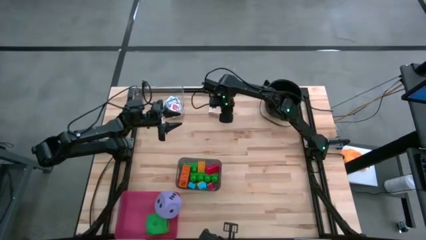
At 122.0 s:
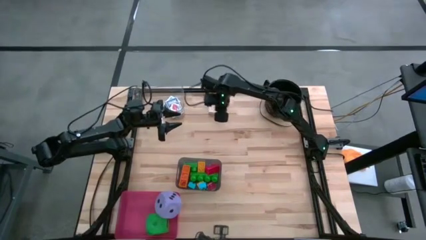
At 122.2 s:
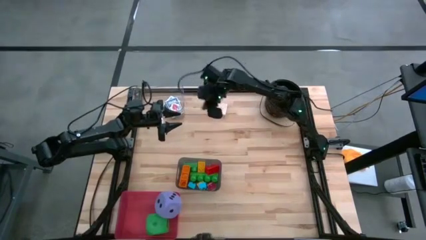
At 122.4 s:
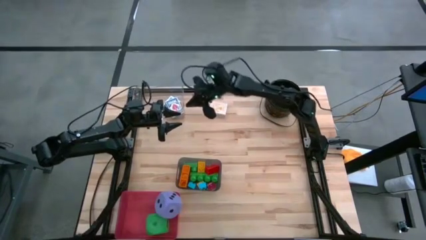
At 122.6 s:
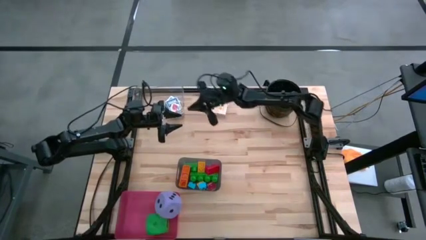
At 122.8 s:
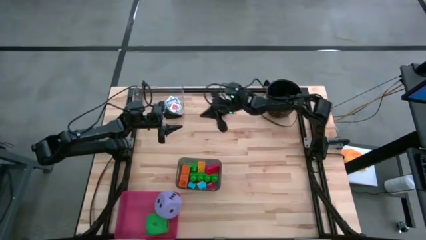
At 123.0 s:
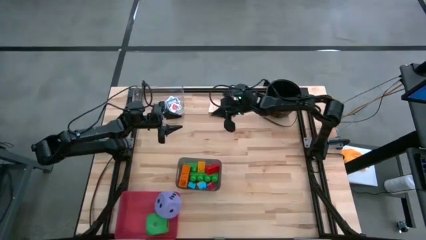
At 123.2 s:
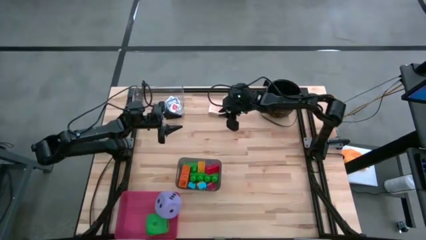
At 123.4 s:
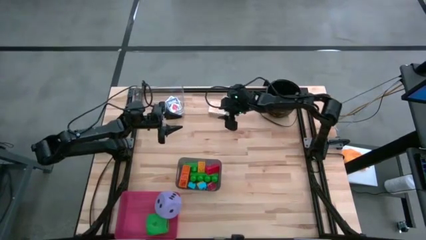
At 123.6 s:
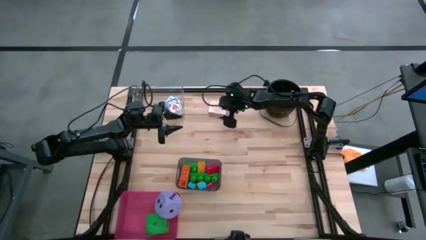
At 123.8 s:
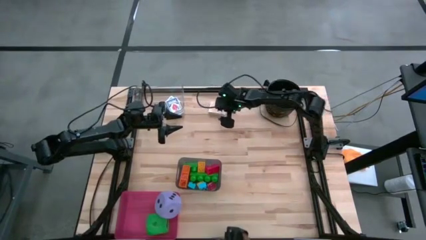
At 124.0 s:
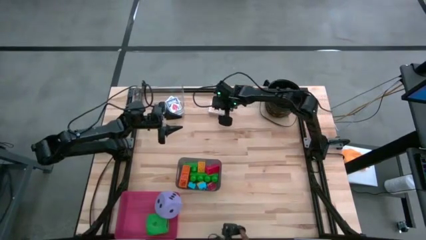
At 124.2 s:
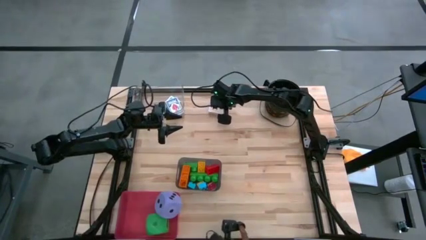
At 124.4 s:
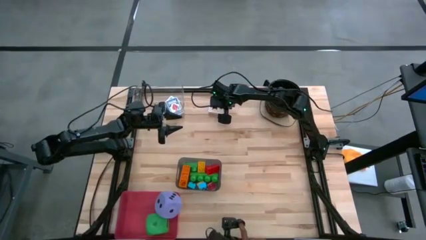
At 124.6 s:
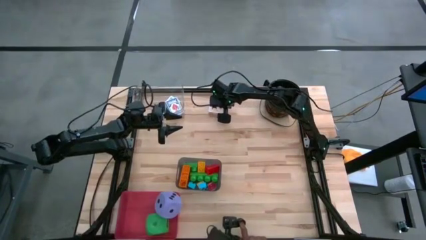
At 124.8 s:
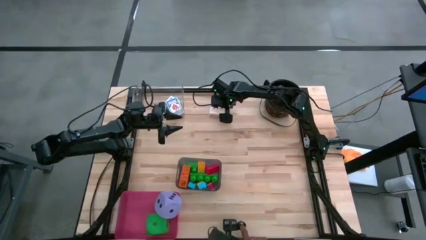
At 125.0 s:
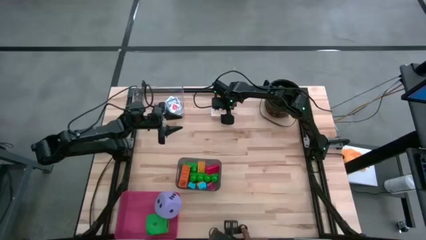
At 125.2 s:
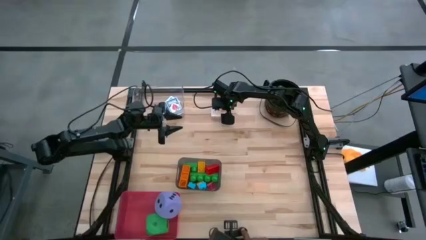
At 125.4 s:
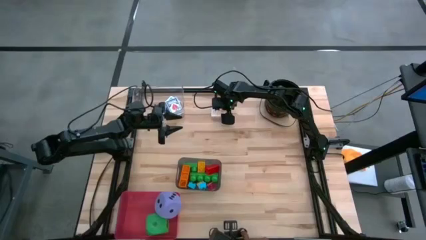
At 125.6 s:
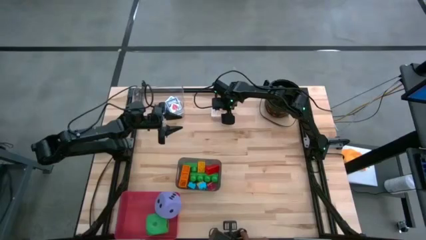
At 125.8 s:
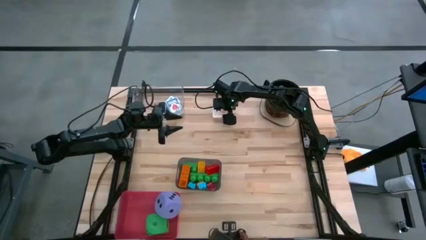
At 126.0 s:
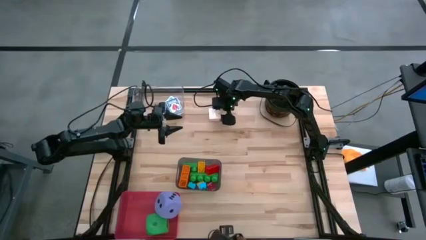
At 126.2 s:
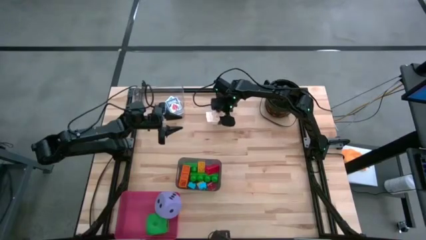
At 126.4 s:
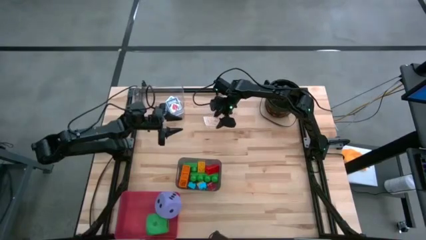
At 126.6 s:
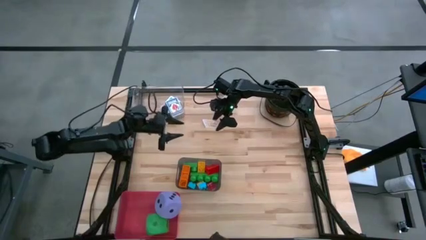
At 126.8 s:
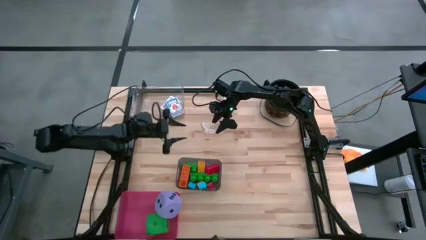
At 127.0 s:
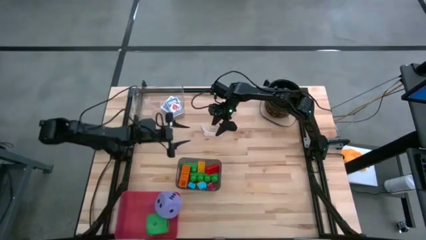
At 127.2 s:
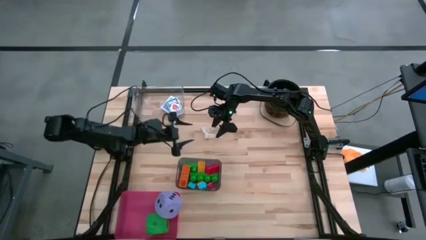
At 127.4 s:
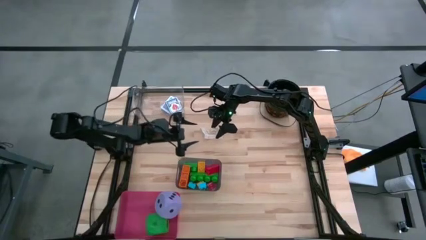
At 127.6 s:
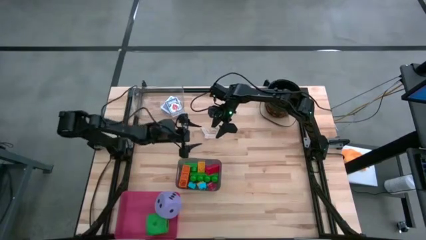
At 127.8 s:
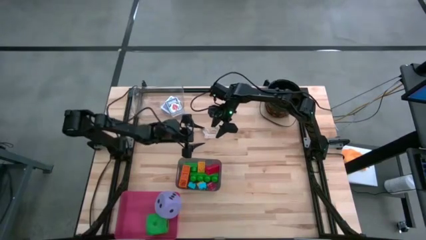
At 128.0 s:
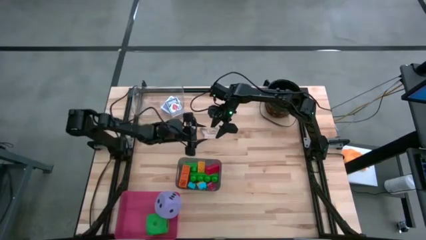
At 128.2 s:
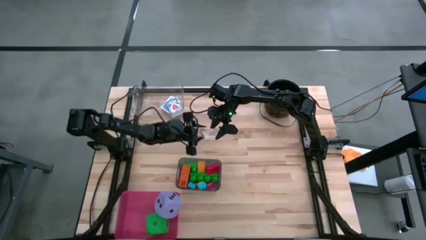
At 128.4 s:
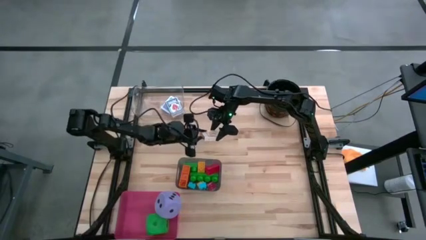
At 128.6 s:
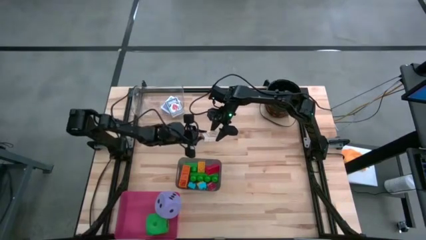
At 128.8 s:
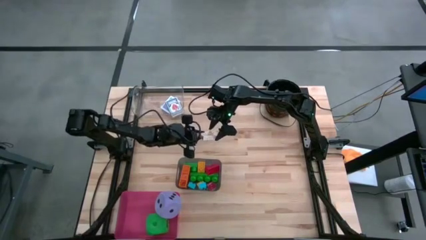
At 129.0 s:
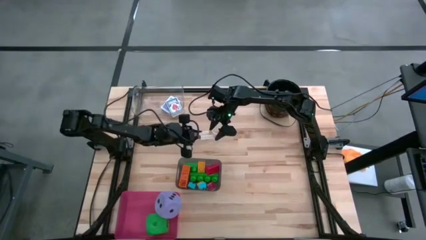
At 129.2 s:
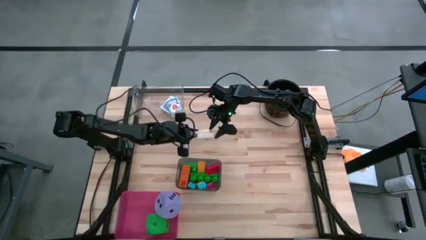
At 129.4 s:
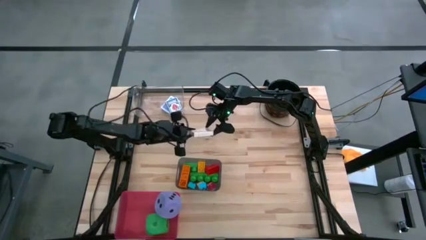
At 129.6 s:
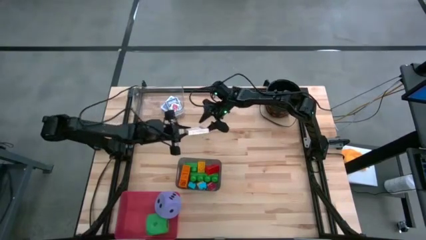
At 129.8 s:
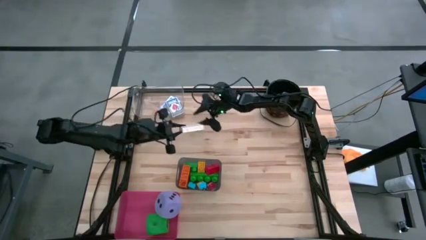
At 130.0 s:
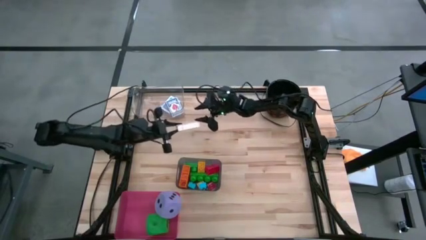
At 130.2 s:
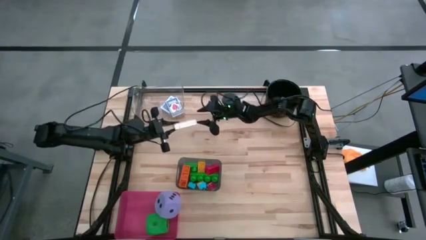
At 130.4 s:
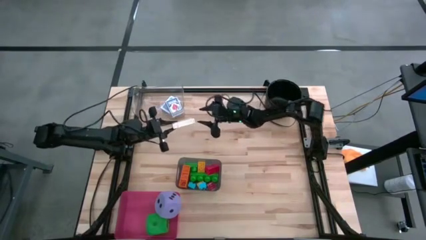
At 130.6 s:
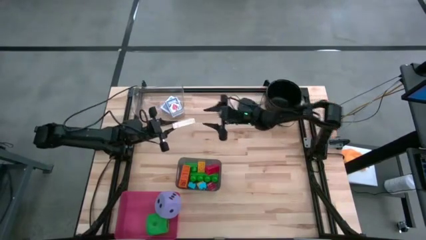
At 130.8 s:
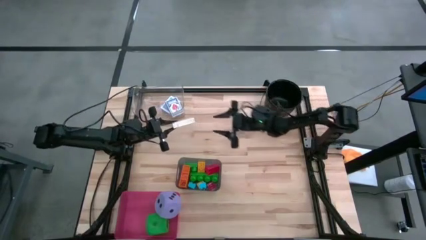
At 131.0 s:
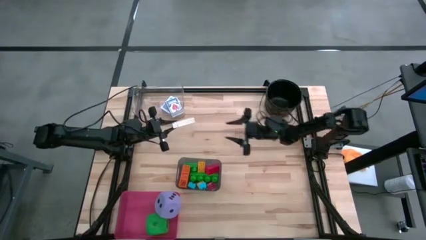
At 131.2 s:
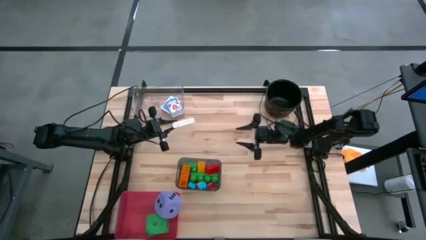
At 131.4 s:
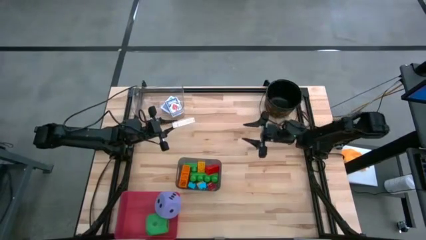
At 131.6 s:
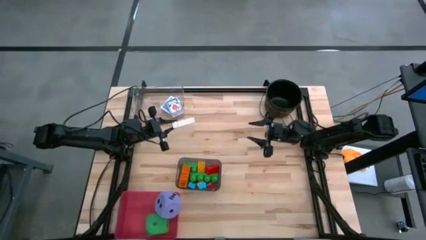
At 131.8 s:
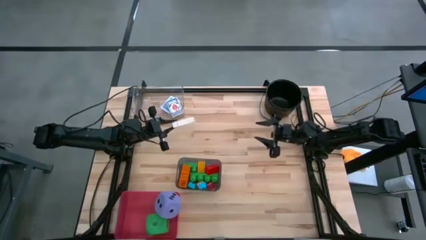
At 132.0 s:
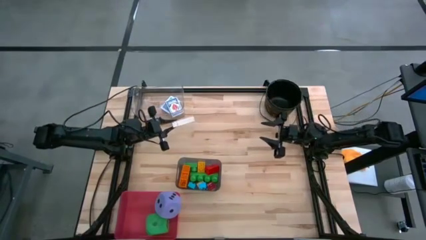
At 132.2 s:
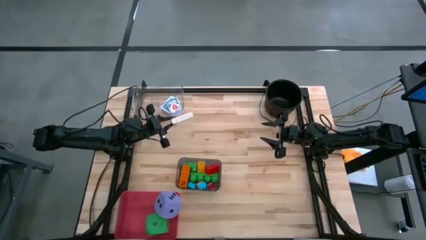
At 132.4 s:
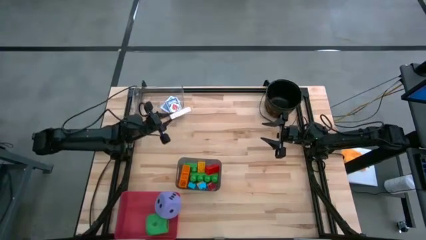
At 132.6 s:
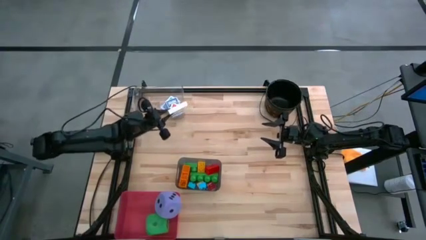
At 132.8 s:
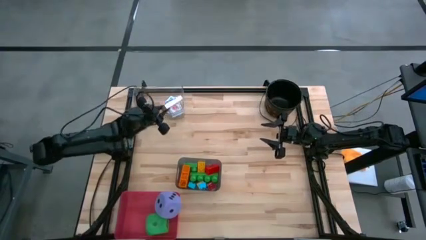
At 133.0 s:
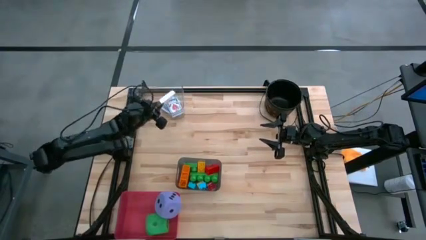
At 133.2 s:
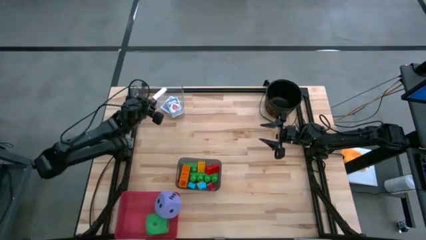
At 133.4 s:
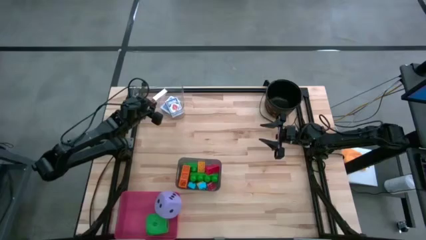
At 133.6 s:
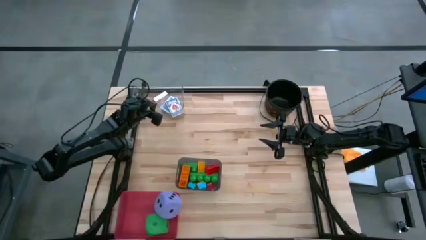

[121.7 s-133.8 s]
Task: Pick & Place Toys
Put the yellow playing card into the transparent bin

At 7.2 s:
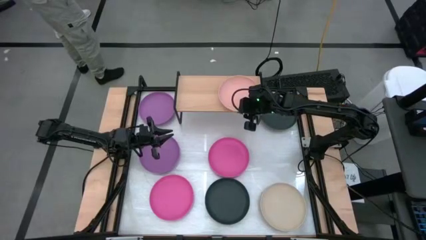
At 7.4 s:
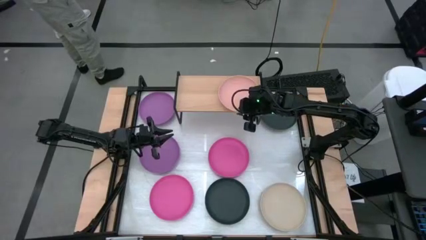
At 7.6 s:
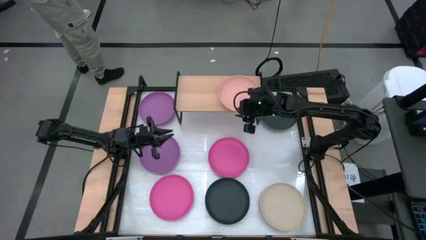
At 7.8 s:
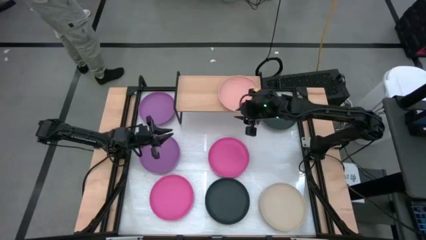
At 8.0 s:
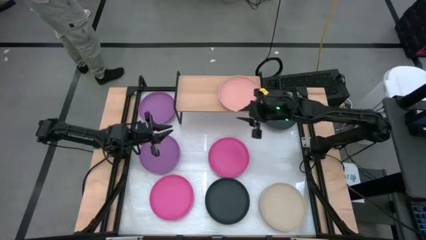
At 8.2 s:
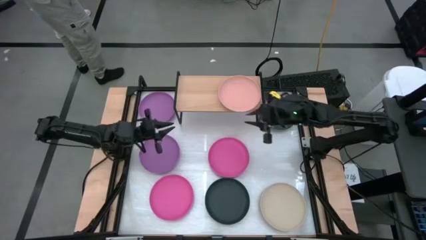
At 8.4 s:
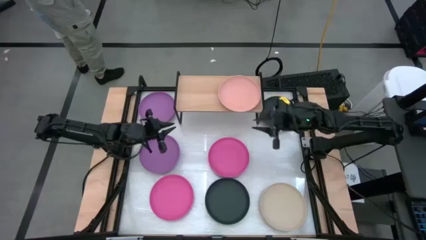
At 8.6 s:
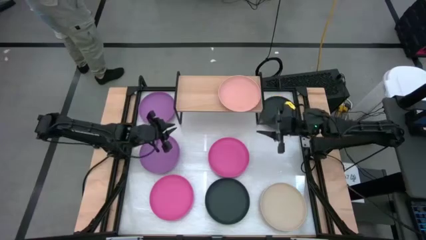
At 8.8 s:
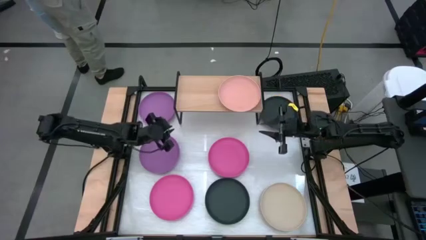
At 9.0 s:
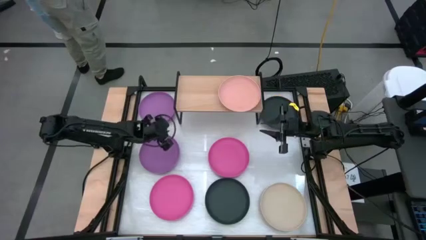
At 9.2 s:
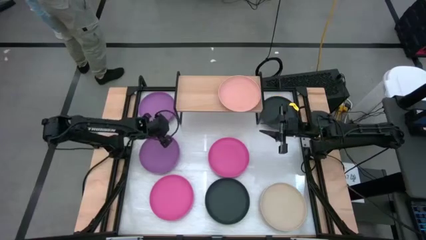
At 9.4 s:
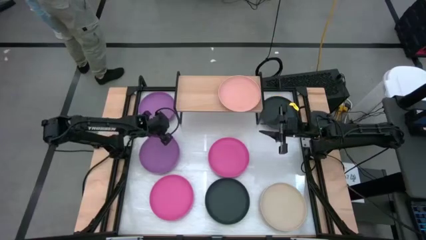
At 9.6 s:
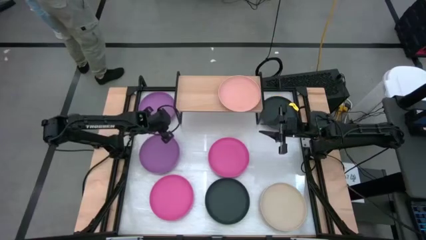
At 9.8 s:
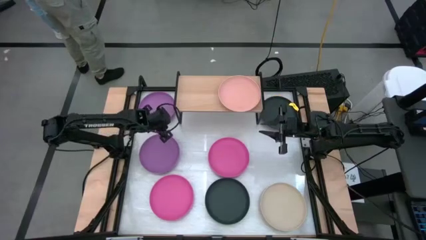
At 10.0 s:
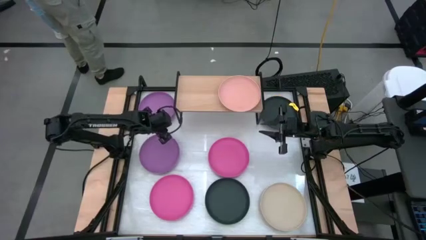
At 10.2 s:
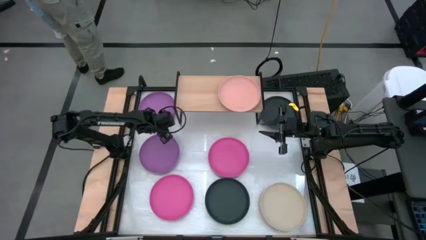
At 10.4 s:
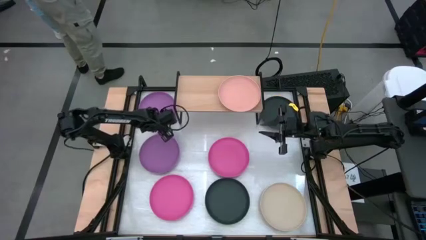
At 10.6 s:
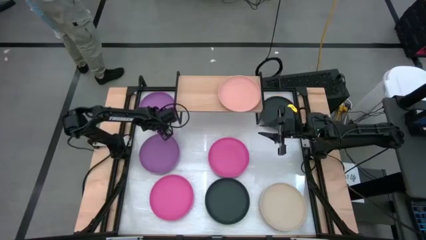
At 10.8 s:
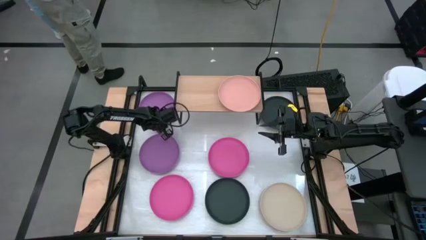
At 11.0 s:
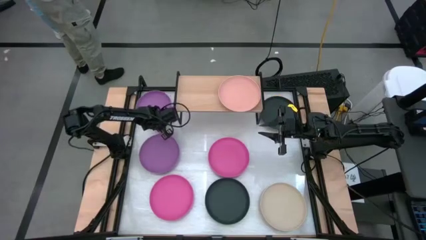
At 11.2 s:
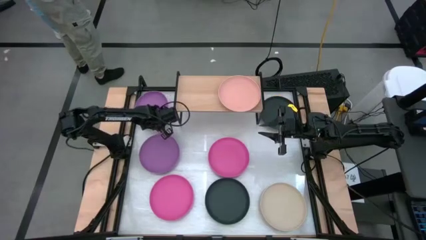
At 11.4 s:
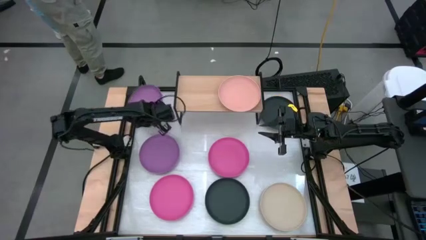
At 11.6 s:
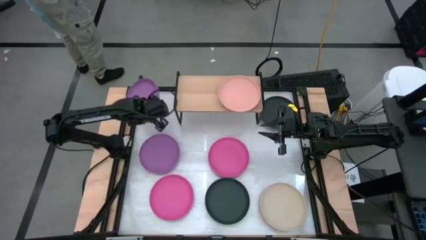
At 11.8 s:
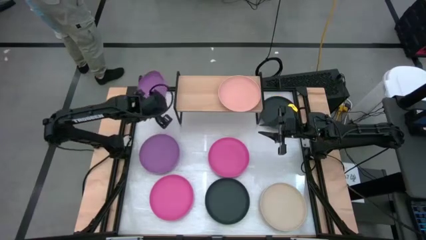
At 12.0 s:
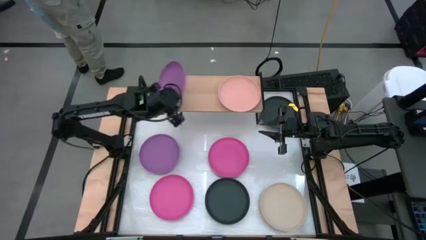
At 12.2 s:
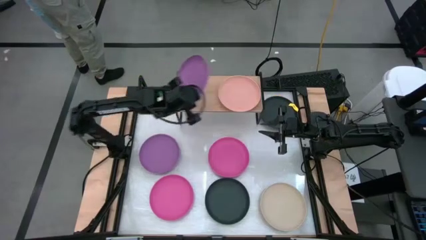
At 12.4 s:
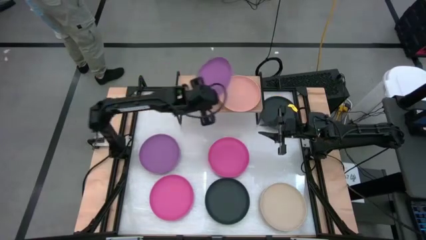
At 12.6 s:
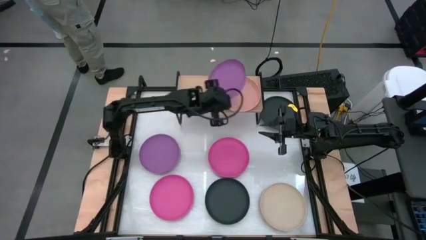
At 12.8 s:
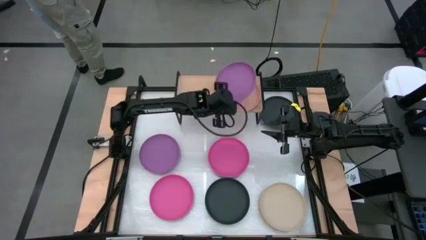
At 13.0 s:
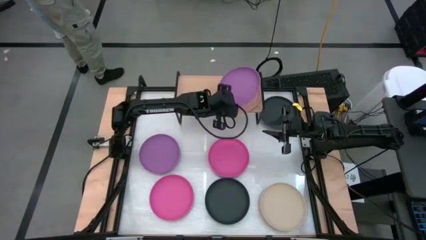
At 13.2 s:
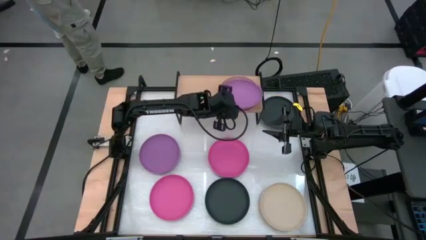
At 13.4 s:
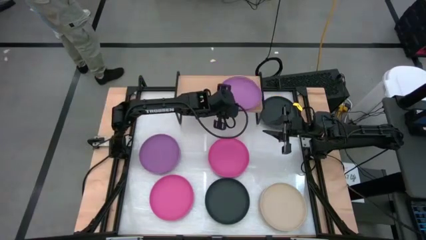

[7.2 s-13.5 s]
Task: Place and stack plates onto a shelf
Stack the top purple plate on top of the light orange plate on the shelf
